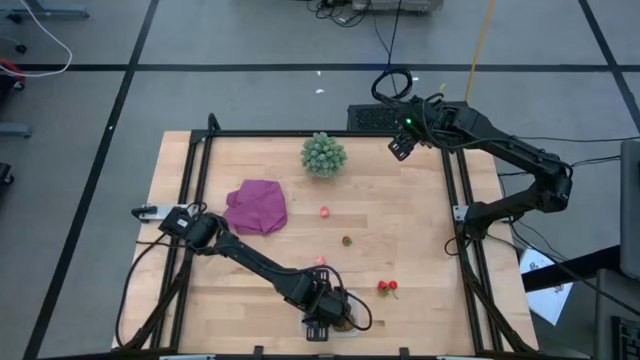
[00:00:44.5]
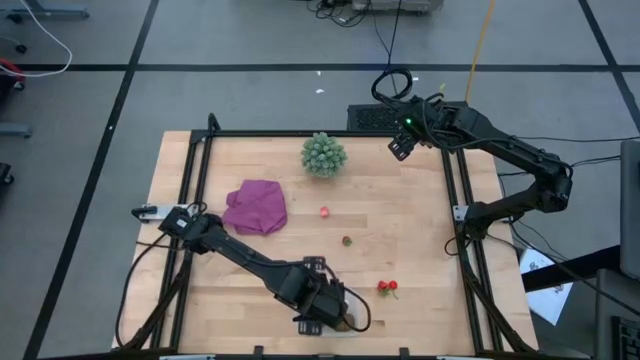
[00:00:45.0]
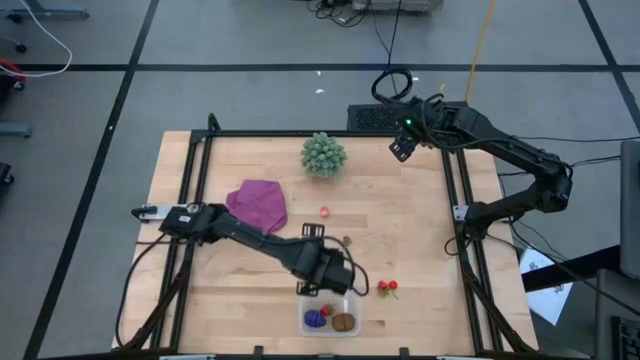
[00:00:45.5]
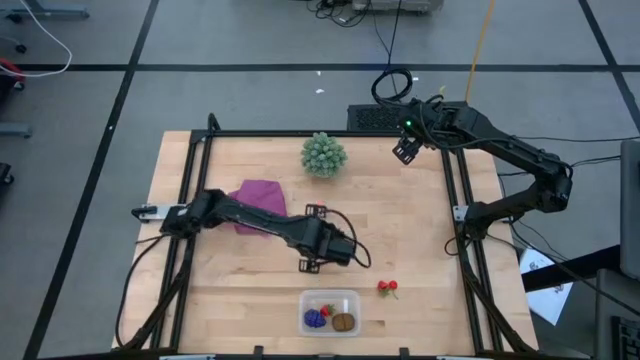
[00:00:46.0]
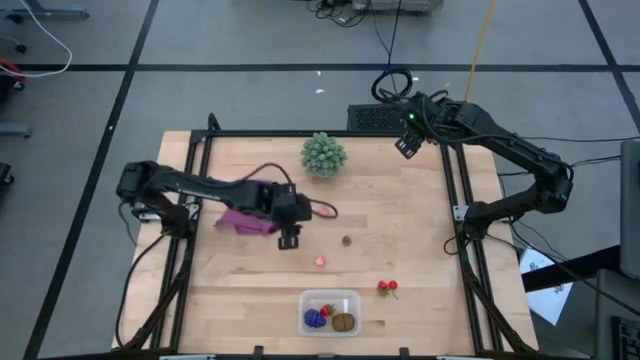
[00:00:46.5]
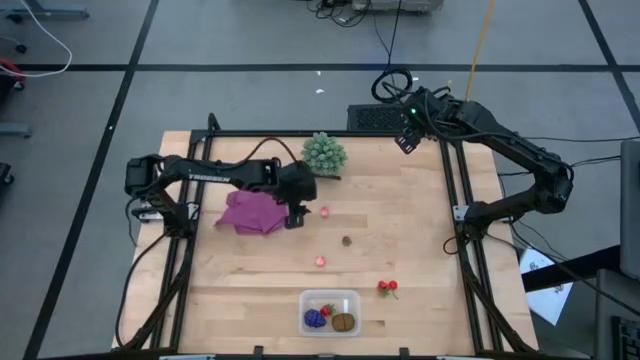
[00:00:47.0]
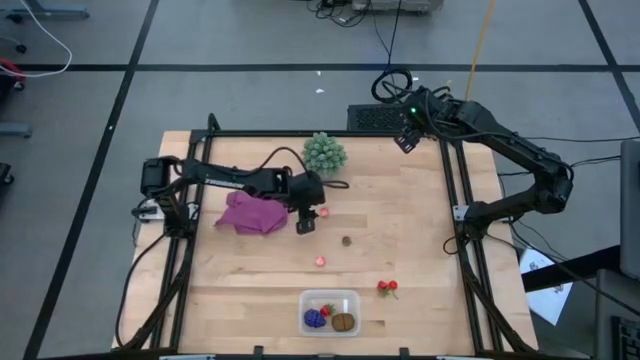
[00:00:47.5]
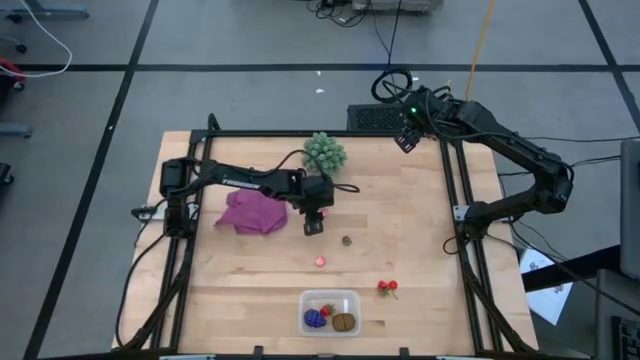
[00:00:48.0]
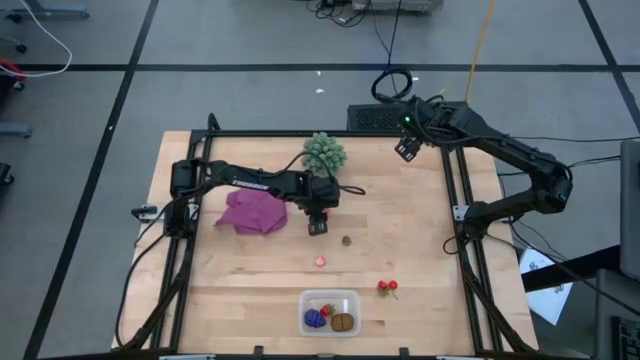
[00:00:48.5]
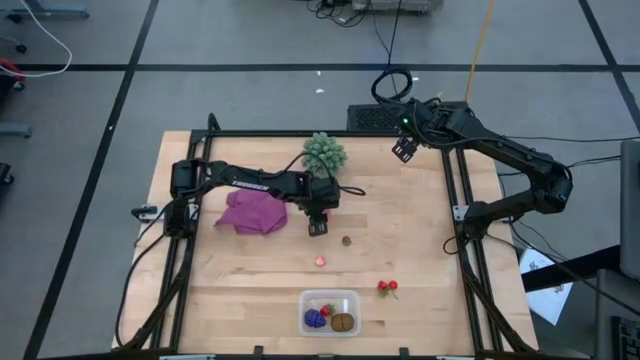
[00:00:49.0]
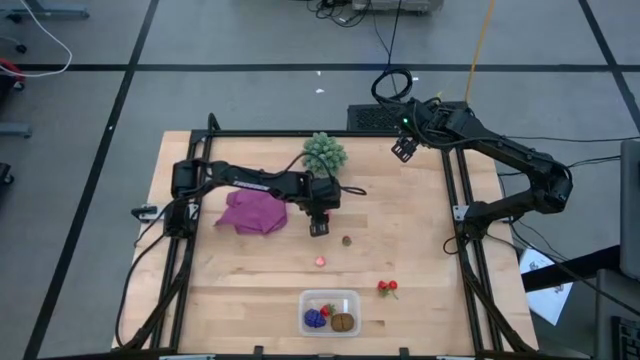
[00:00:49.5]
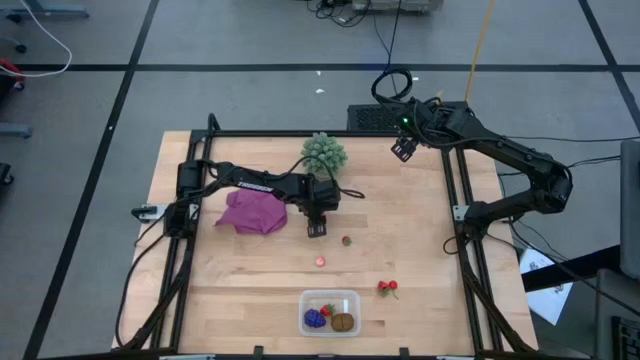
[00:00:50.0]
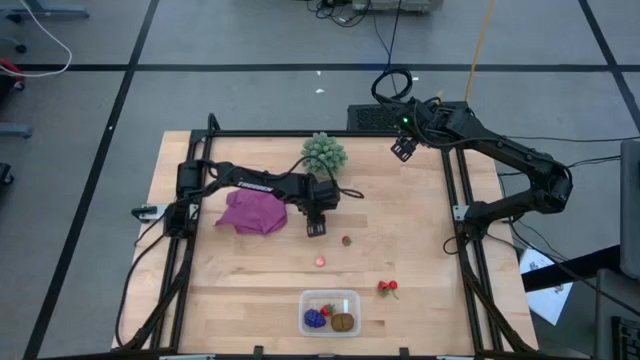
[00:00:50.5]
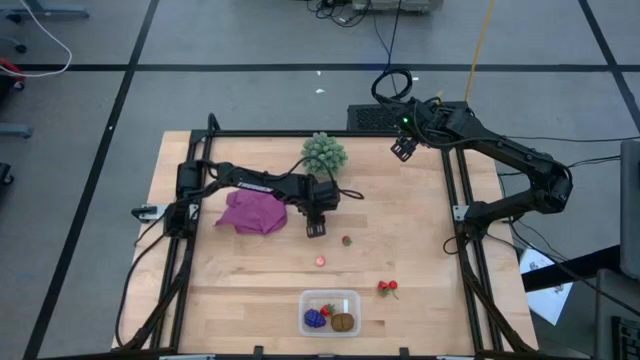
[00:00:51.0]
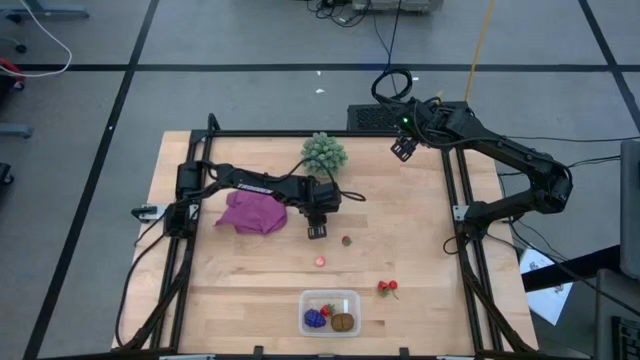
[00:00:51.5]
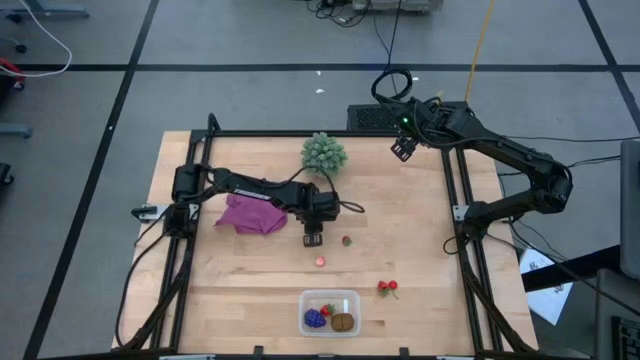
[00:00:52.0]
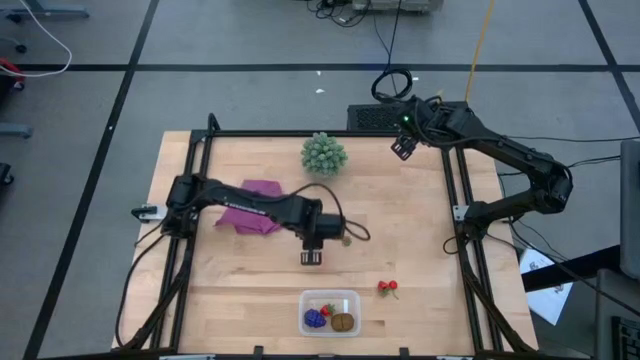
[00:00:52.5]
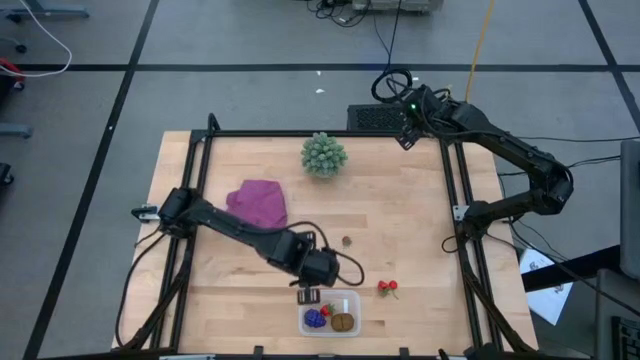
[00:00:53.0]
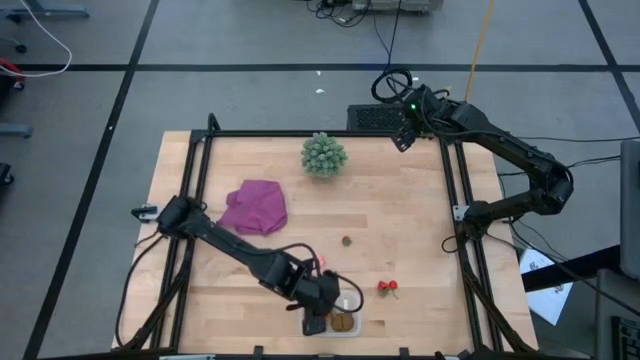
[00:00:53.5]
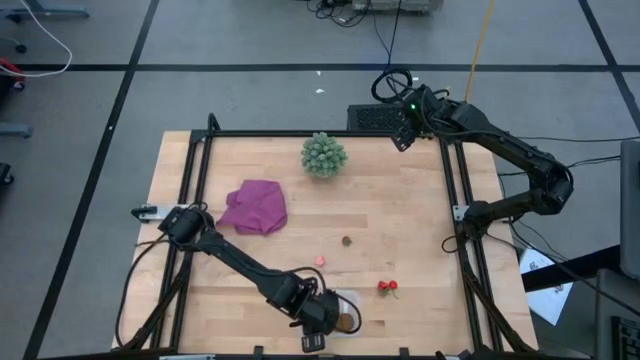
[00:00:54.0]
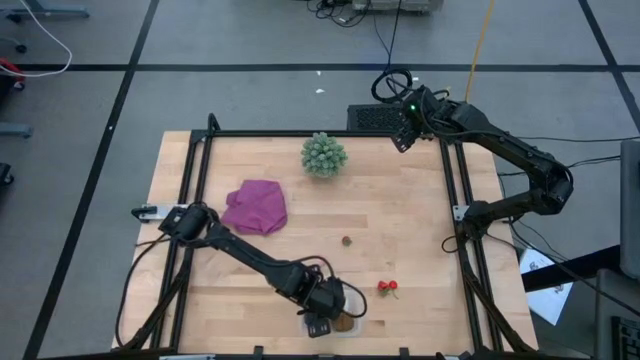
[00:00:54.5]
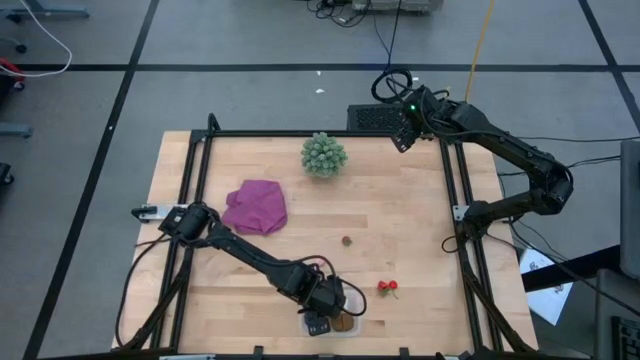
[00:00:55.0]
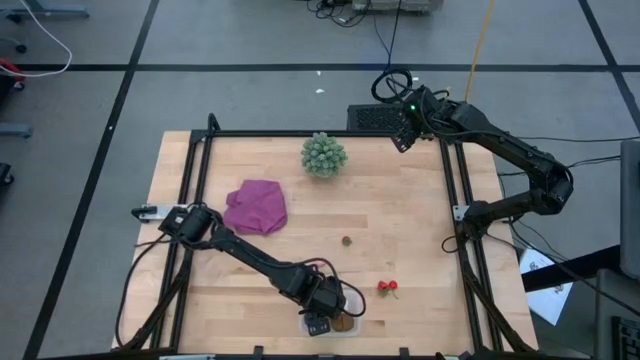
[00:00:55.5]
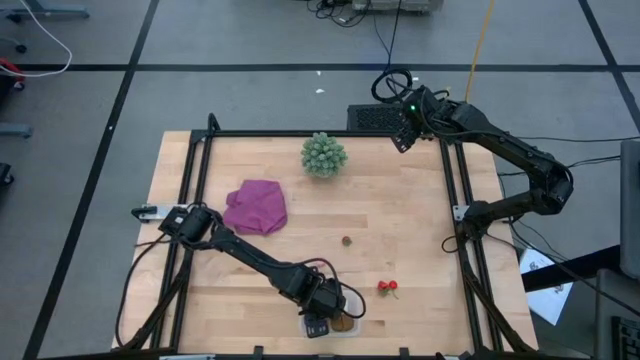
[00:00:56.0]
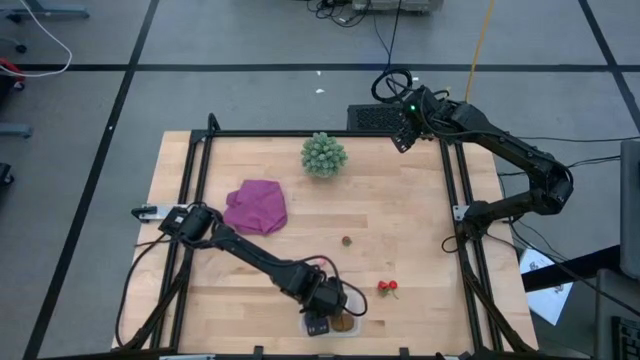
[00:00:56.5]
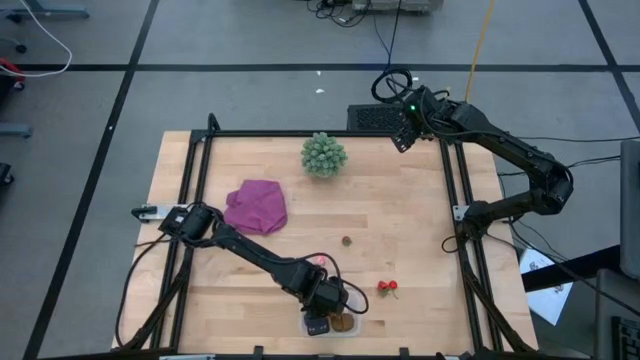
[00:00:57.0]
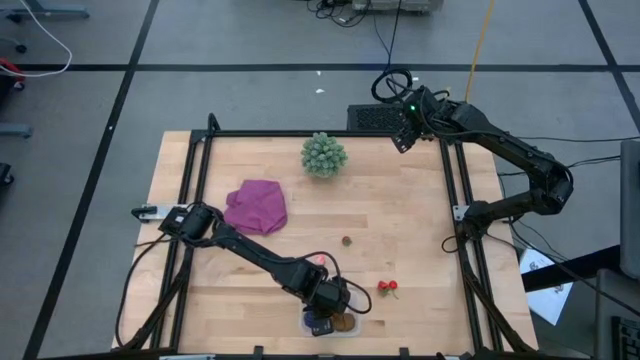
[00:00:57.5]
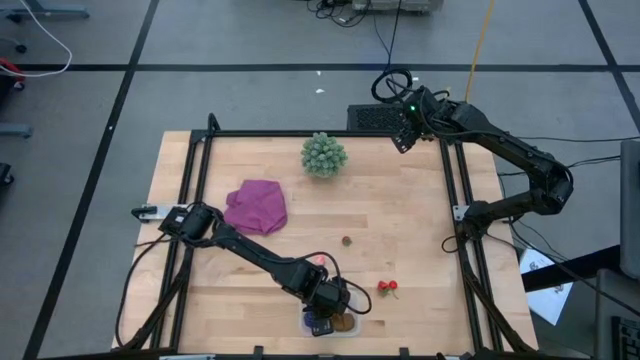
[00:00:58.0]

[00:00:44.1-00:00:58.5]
Task: Pick and placing Produce into tupperware
Put the top pink peach into the transparent container

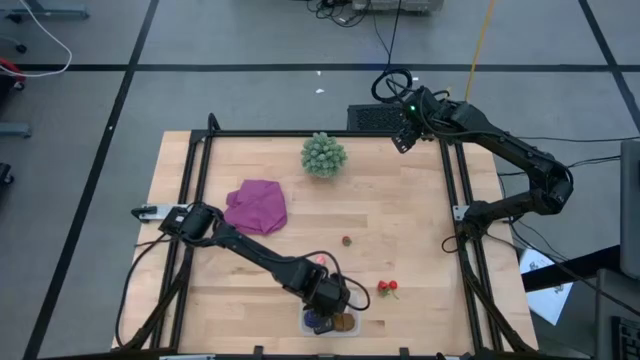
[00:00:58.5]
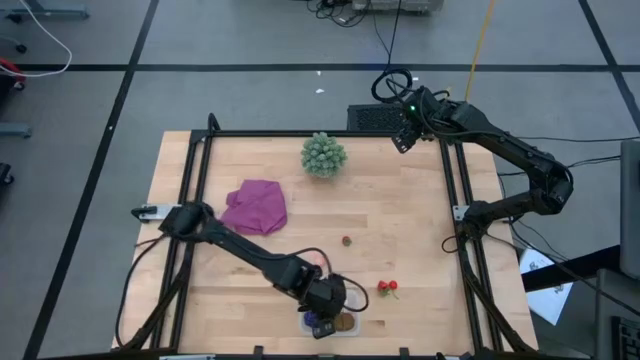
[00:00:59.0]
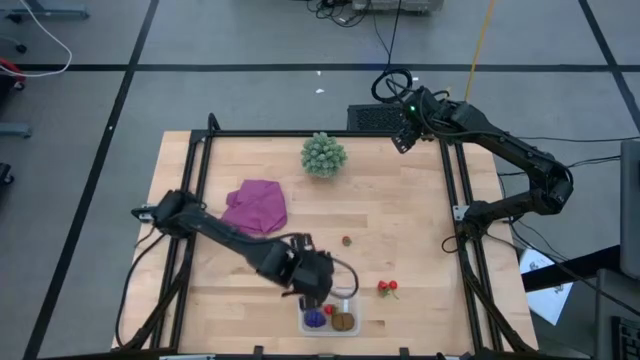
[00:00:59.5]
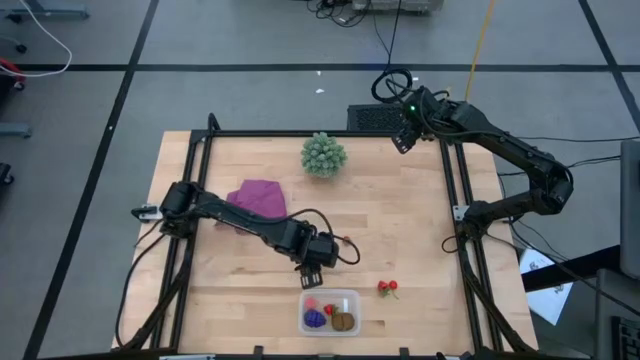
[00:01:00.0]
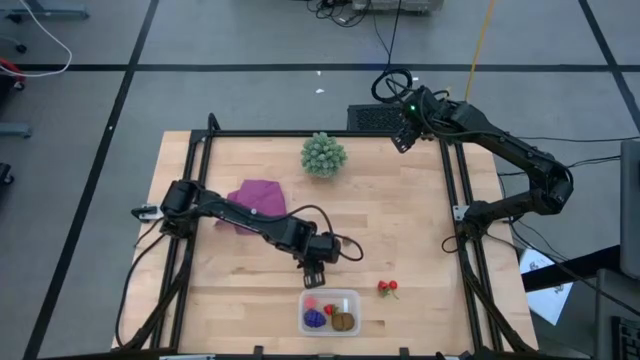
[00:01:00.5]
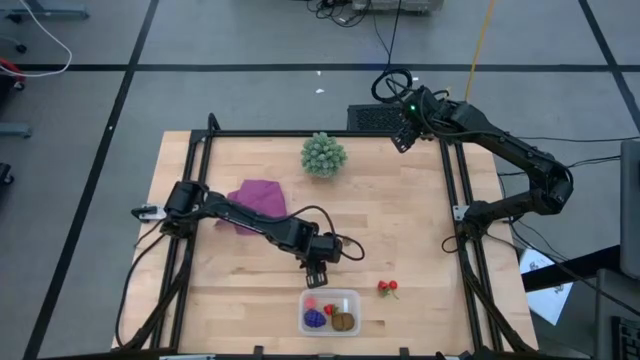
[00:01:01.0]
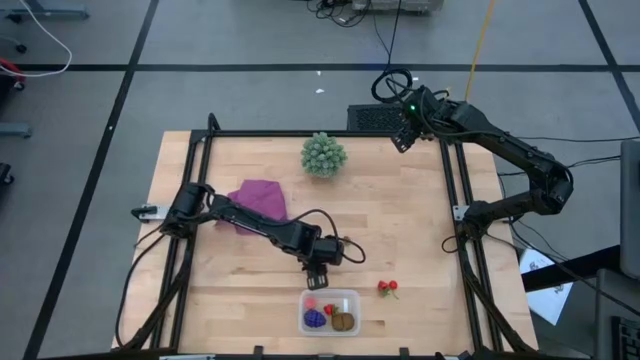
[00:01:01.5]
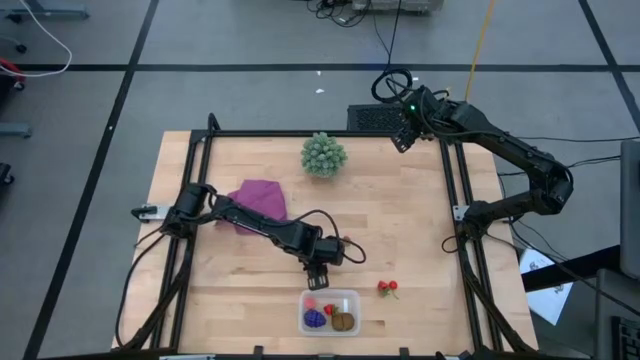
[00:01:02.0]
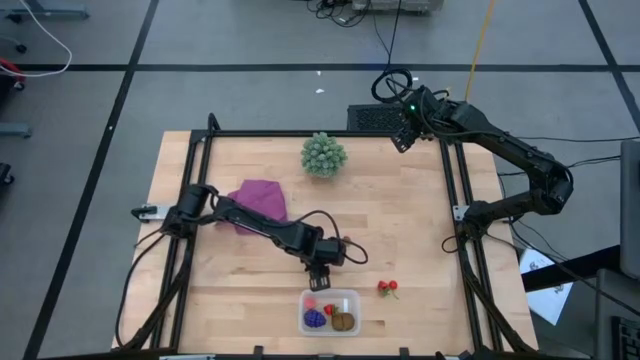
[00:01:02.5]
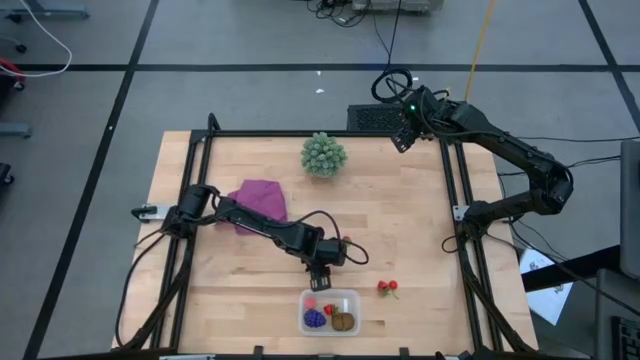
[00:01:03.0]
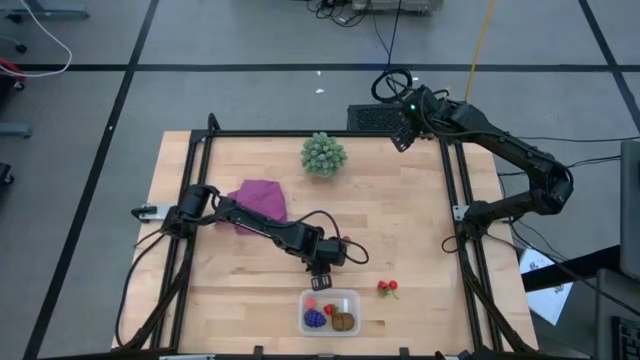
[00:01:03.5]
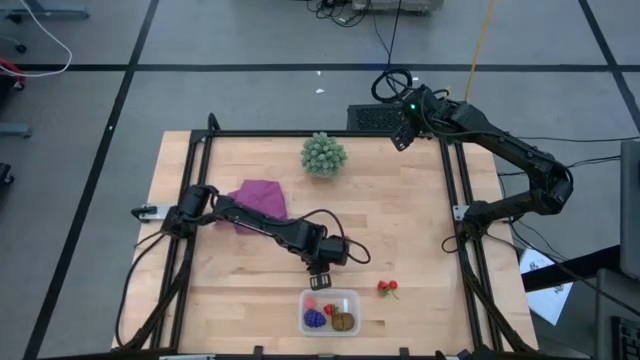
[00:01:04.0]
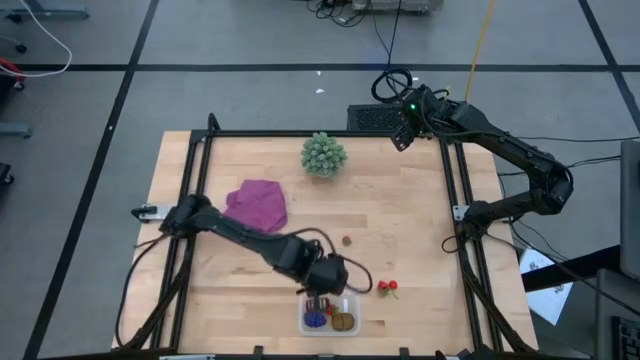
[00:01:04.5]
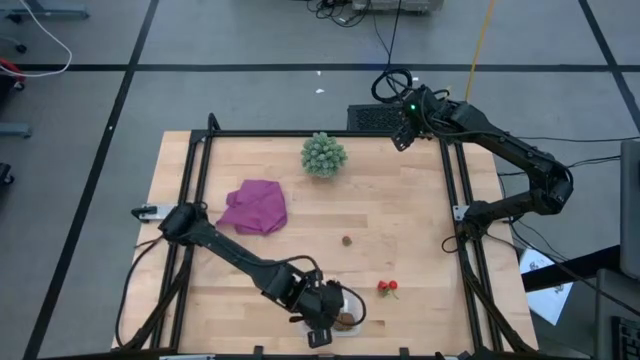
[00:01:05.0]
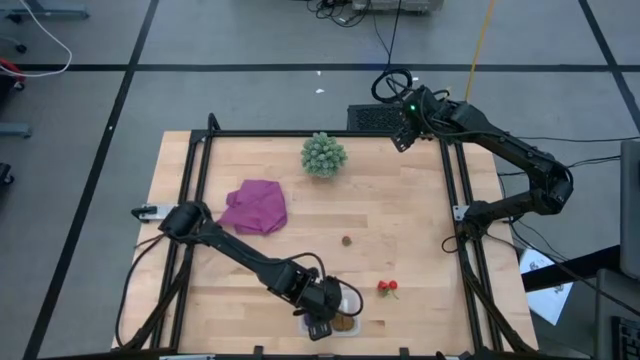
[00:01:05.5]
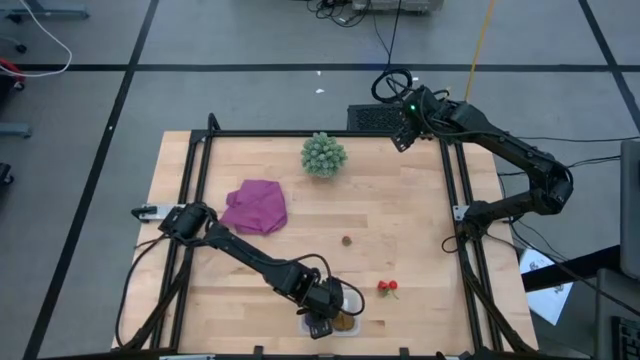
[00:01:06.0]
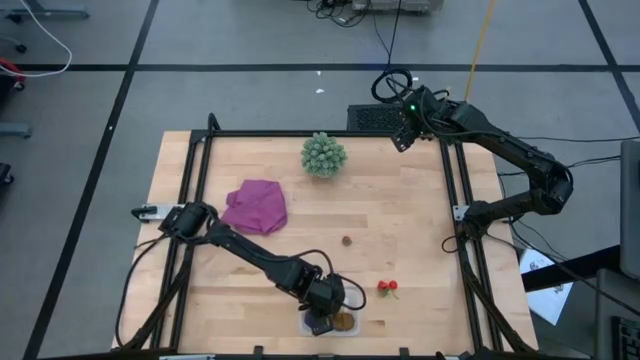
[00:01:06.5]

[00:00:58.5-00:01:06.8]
Put the pink peach into the transparent container
